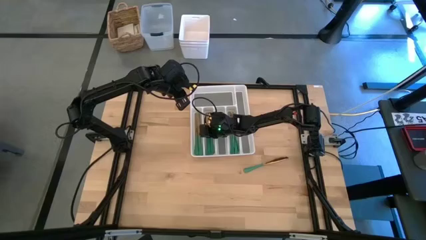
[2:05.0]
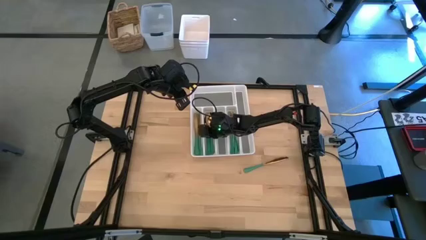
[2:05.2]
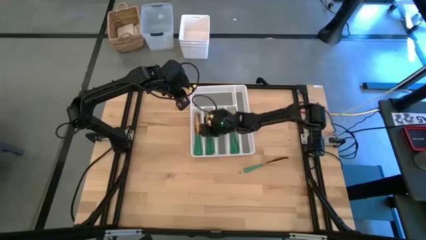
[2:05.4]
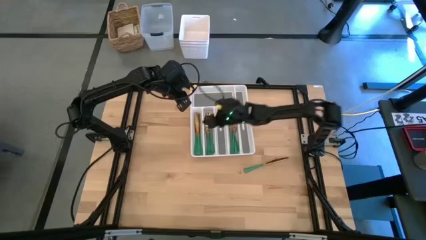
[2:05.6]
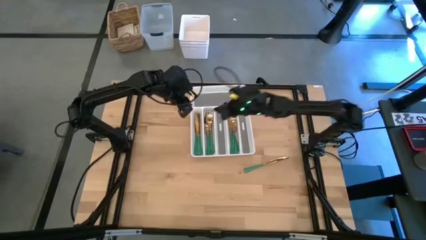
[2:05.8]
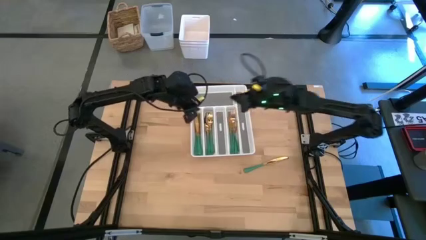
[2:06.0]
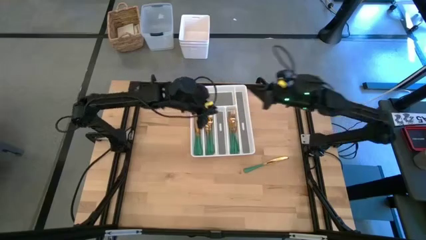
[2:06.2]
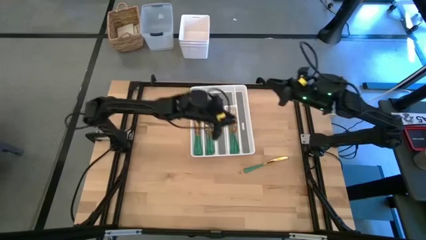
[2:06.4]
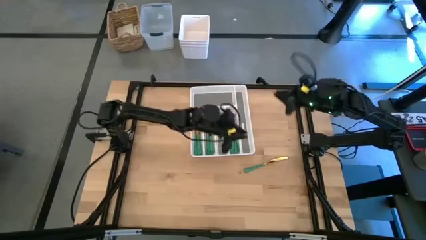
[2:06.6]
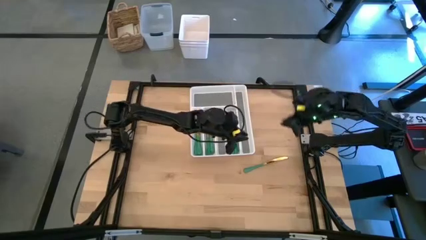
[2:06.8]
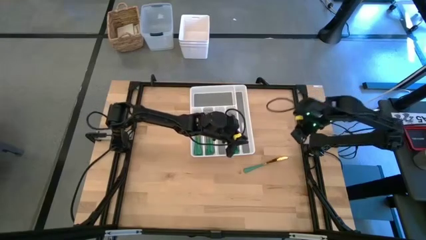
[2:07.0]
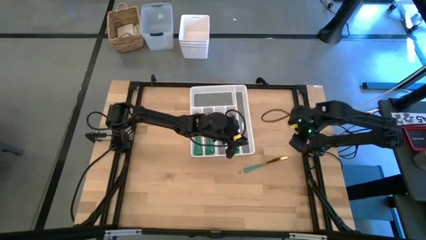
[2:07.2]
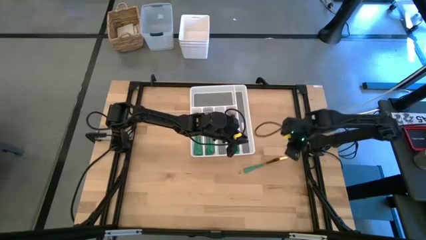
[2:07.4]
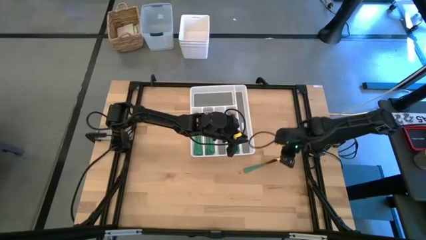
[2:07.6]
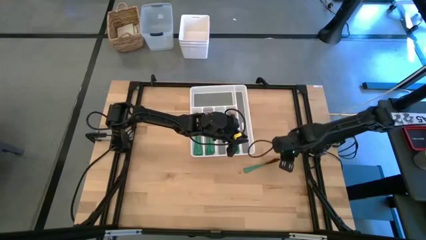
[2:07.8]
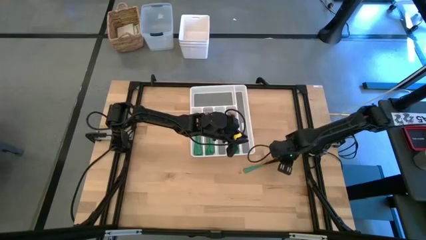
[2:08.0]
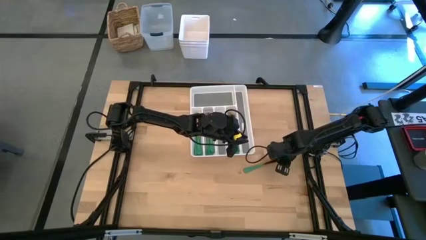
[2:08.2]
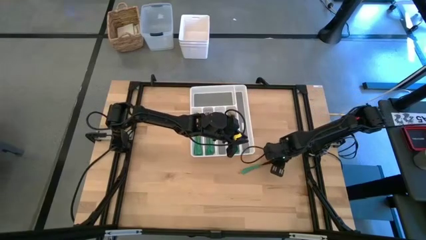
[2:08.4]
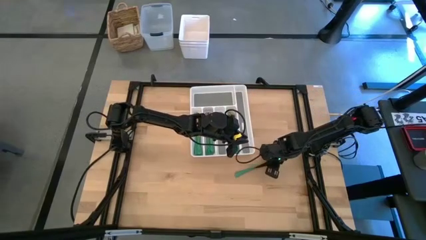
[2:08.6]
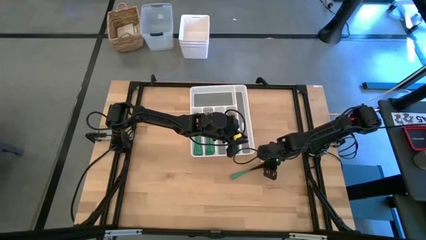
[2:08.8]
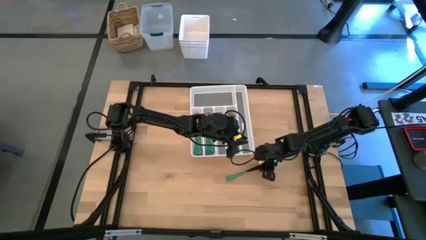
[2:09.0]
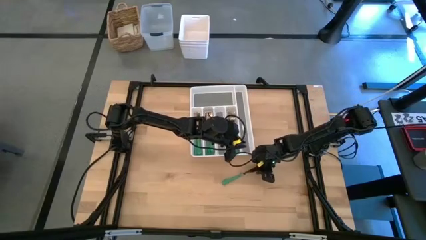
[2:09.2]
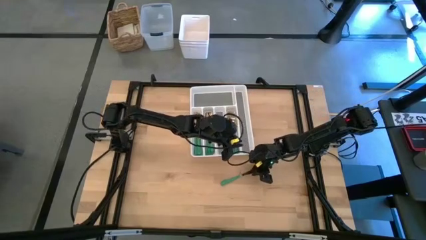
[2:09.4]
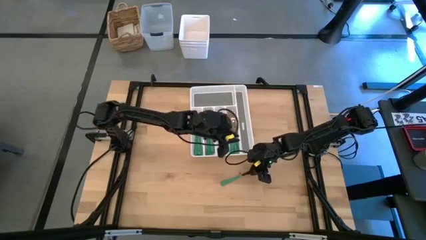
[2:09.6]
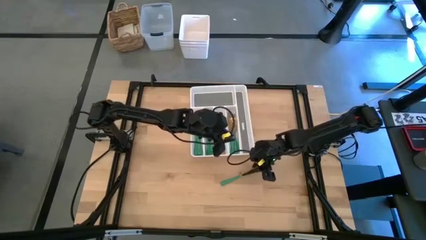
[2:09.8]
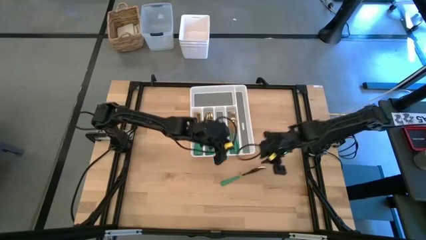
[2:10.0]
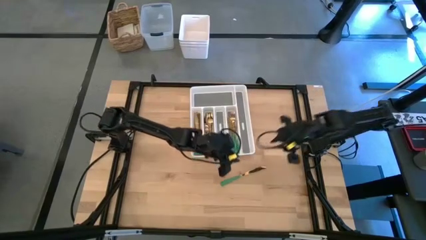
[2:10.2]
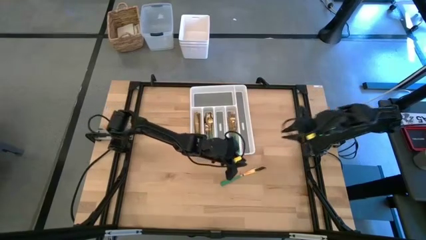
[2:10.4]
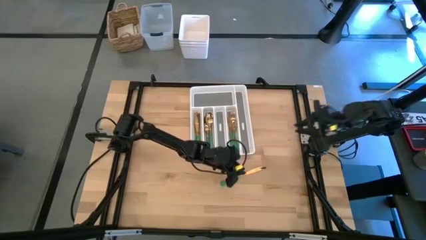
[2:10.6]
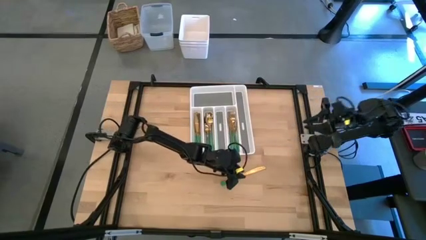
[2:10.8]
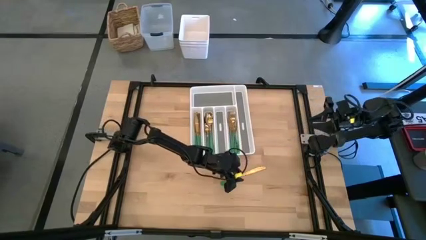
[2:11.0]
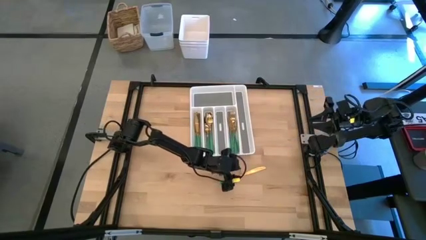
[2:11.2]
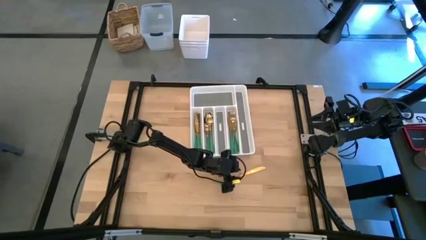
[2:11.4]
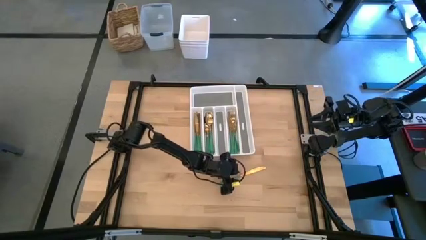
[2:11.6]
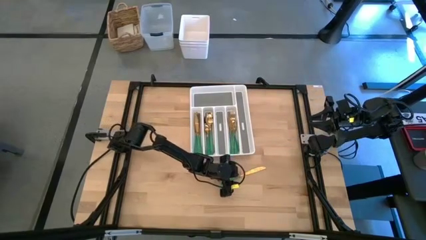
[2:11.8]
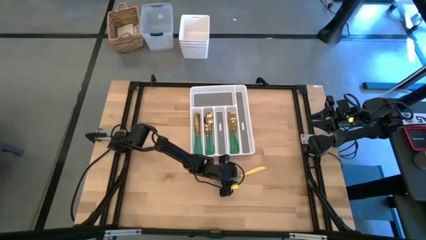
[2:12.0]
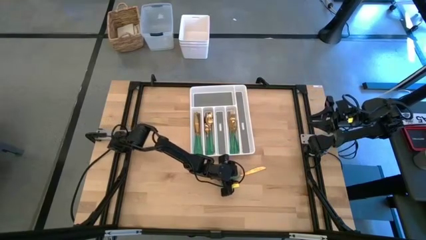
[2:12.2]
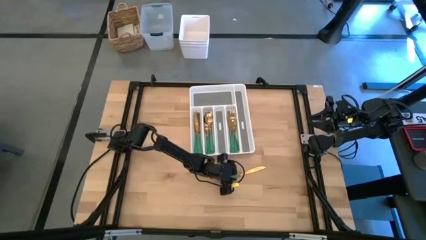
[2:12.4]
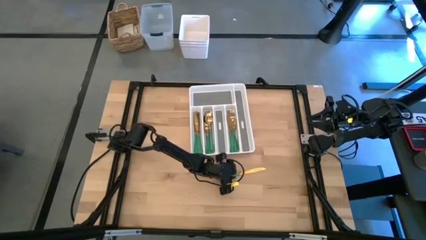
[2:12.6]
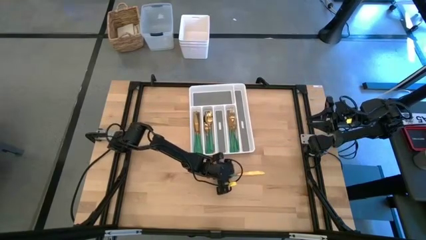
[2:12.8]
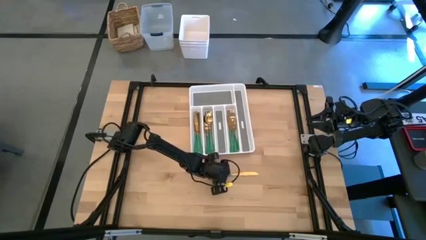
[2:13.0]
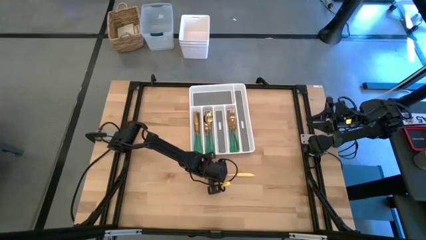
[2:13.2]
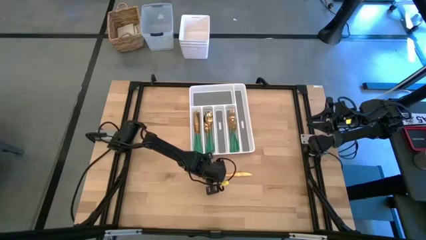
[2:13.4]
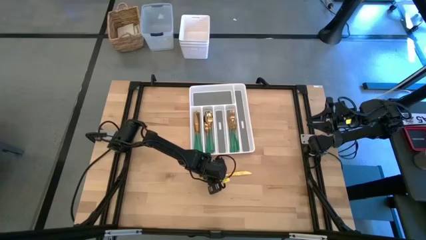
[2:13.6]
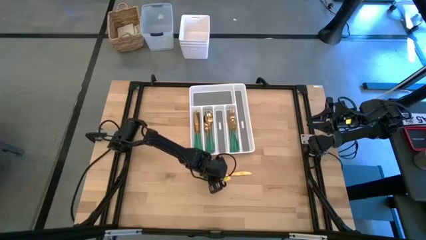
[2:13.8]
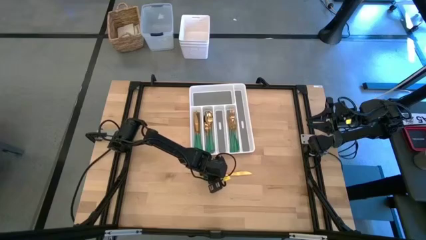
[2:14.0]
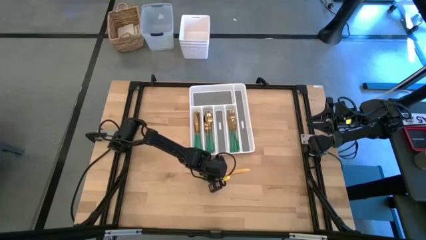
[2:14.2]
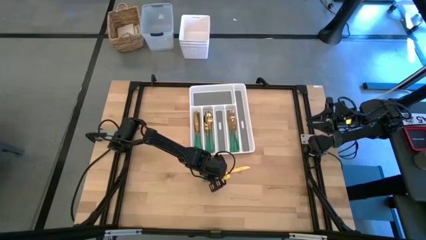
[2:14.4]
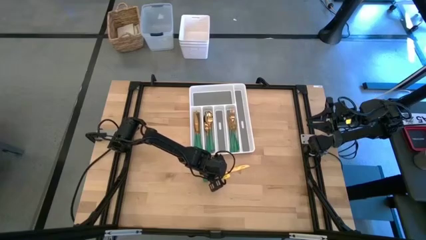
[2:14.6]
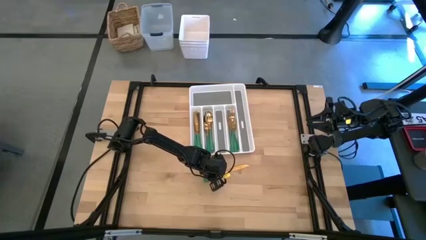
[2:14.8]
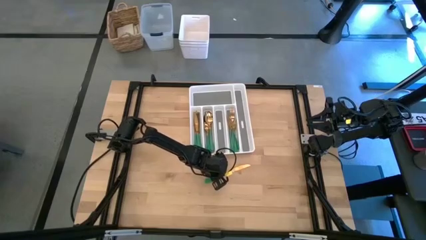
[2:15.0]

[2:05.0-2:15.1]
Task: Sort silverware
Put the knife into the silverware organizer

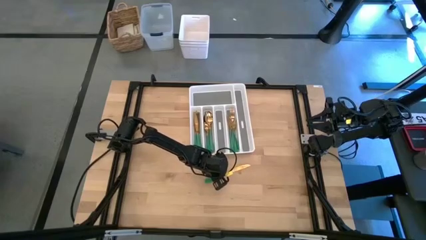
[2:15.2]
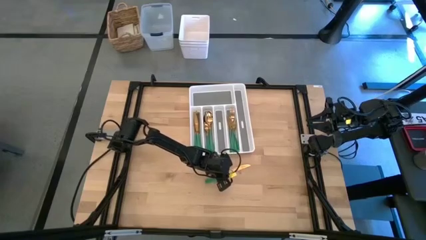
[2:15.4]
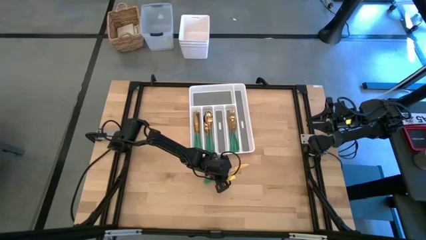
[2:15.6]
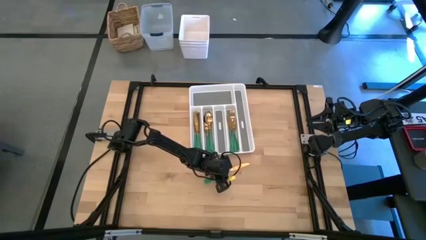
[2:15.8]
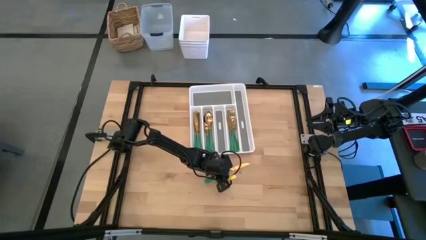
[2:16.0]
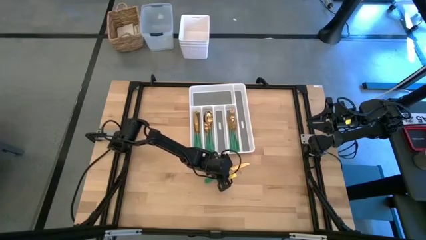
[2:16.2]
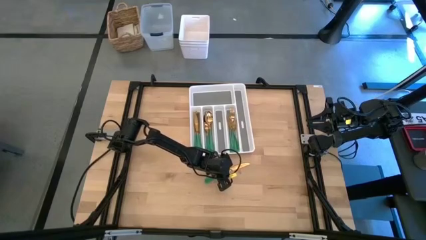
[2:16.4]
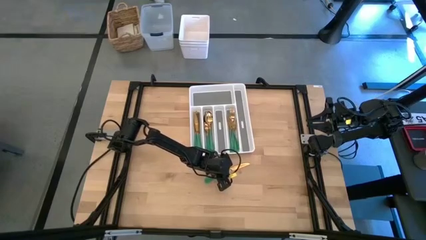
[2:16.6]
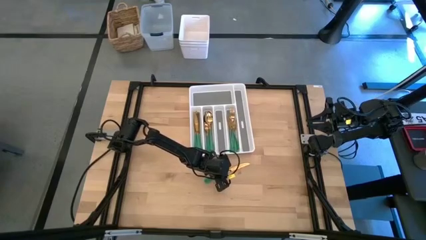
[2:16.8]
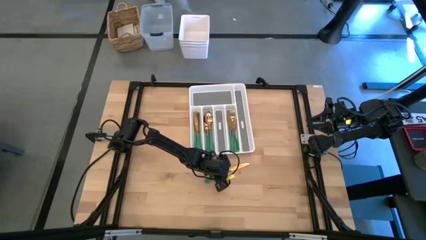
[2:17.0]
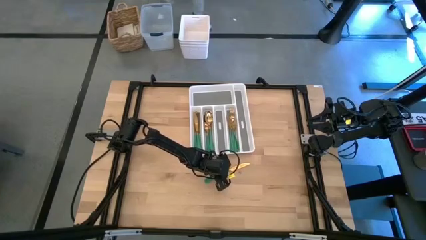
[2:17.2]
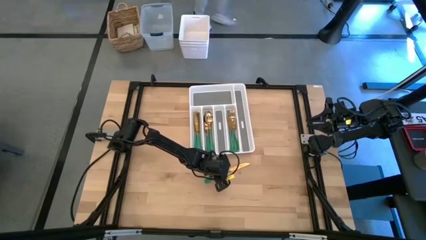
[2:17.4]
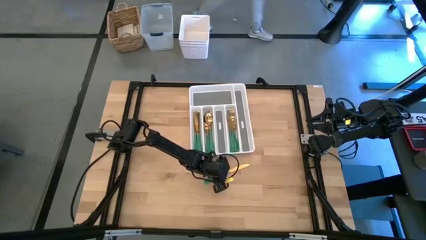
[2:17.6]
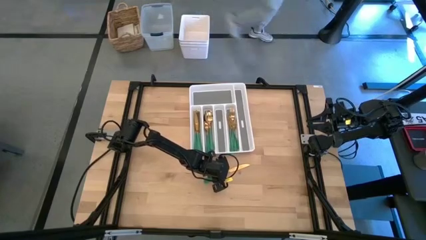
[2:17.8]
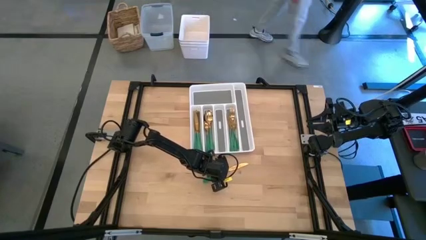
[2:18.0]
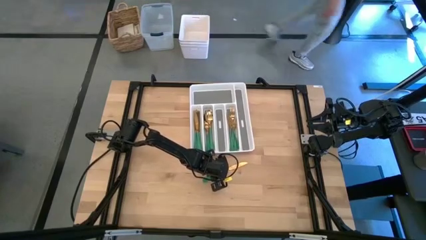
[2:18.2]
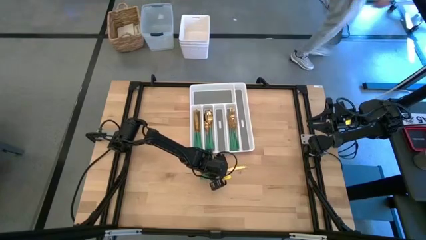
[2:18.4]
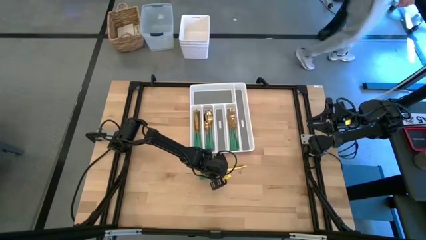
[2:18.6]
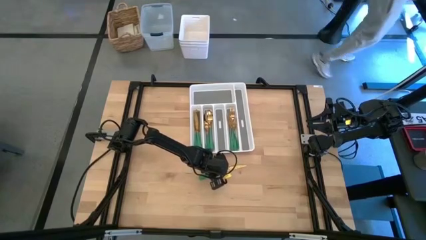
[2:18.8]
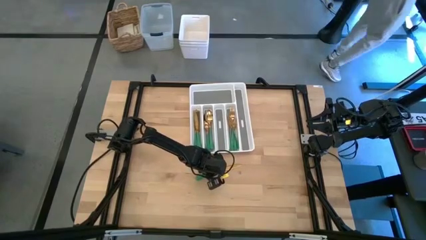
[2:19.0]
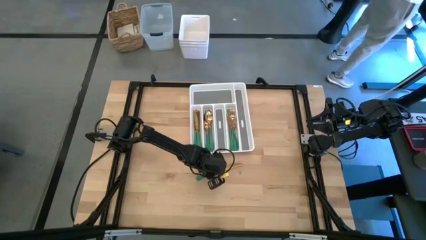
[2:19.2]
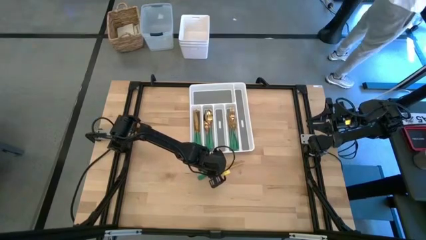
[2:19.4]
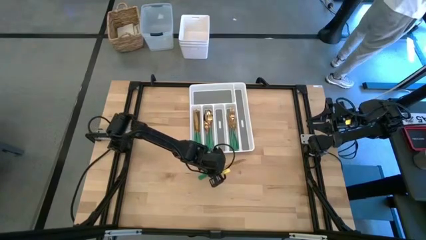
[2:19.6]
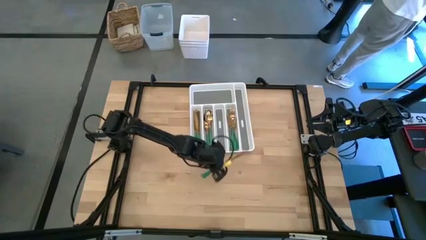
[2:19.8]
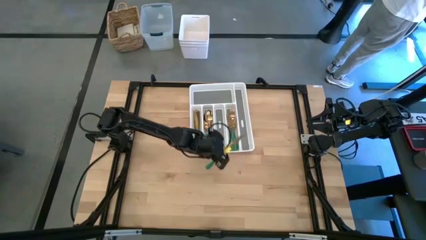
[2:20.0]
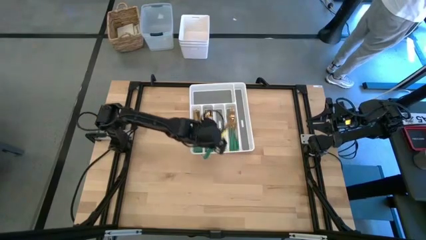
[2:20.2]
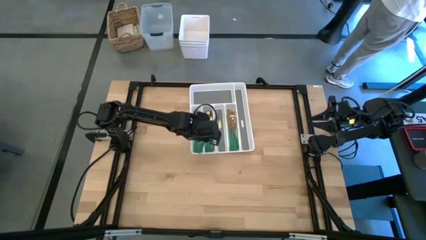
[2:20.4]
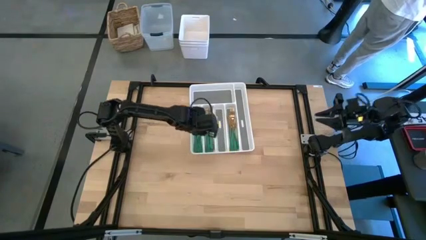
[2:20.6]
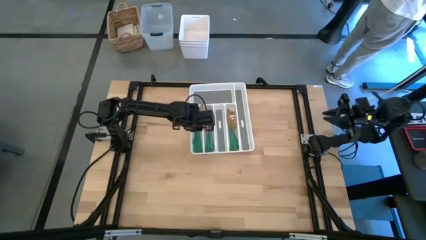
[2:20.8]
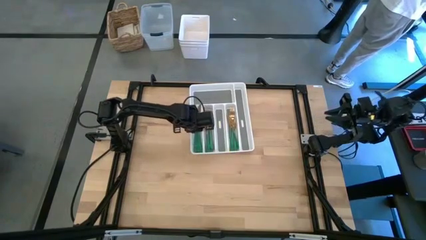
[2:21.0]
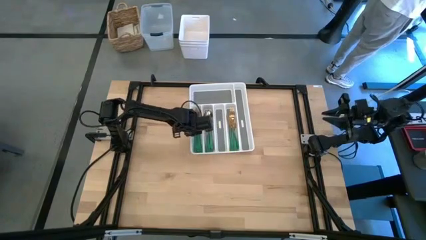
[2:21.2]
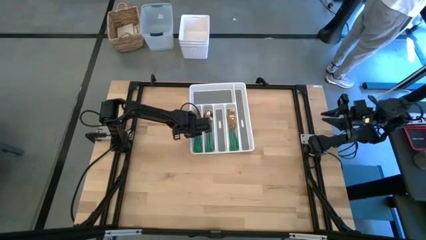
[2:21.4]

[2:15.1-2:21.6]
Put the knife into the silverware organizer
